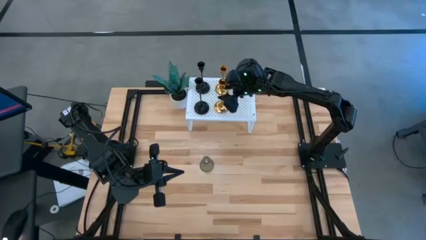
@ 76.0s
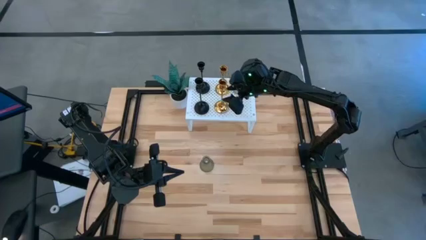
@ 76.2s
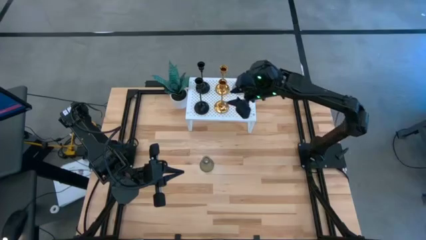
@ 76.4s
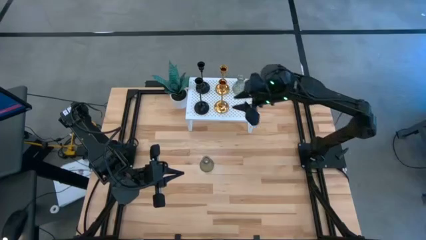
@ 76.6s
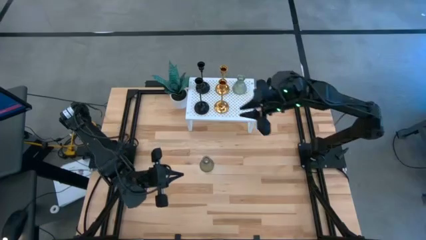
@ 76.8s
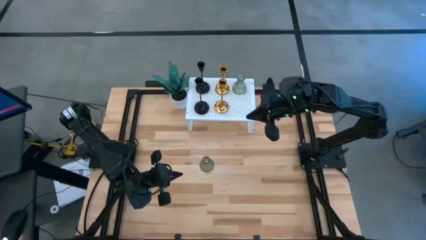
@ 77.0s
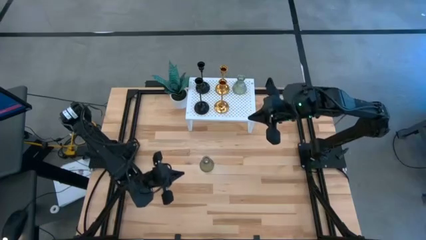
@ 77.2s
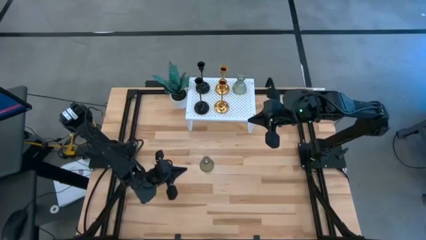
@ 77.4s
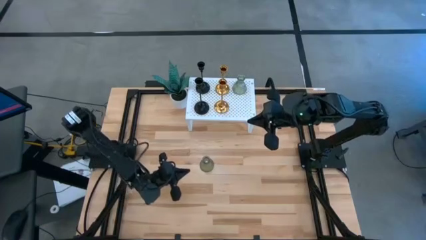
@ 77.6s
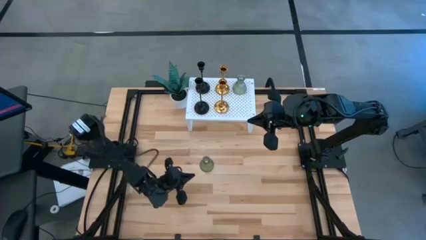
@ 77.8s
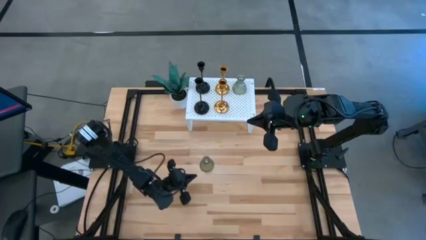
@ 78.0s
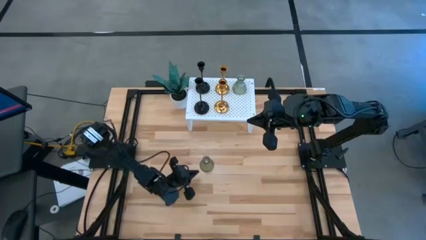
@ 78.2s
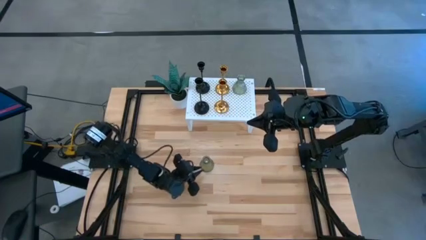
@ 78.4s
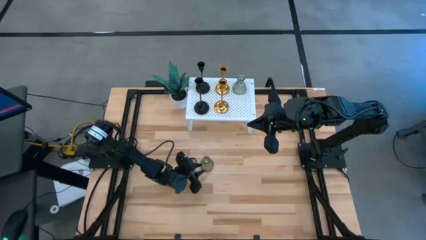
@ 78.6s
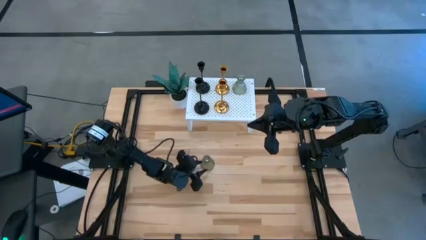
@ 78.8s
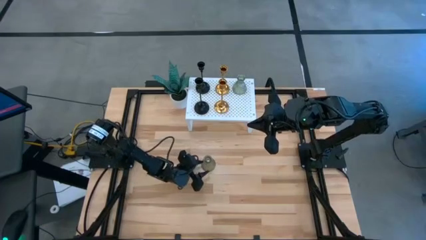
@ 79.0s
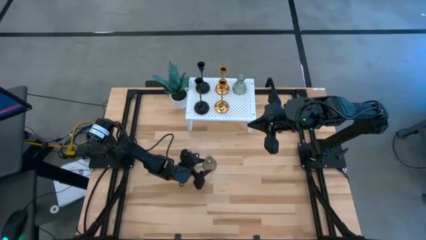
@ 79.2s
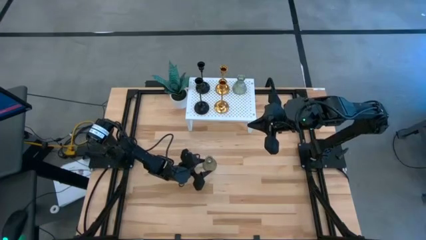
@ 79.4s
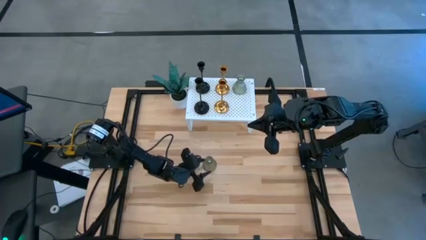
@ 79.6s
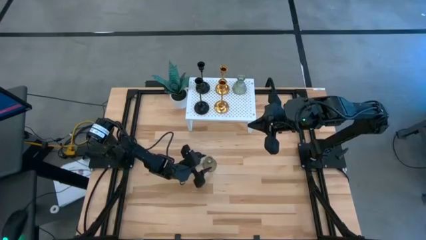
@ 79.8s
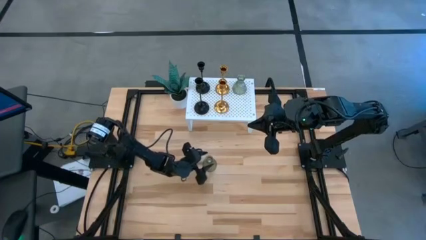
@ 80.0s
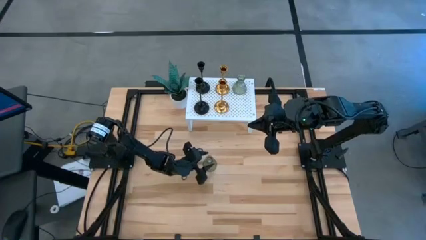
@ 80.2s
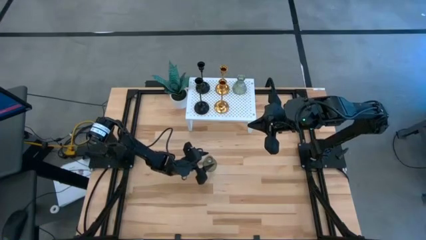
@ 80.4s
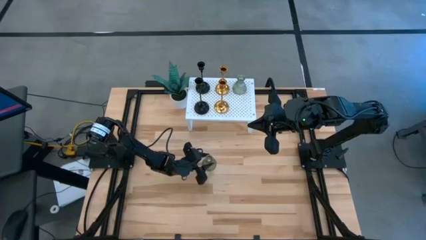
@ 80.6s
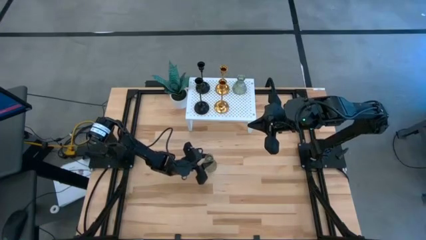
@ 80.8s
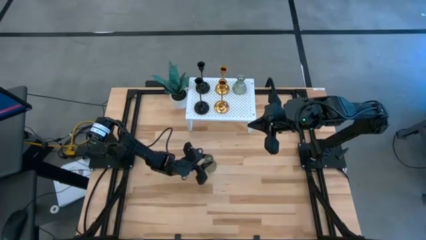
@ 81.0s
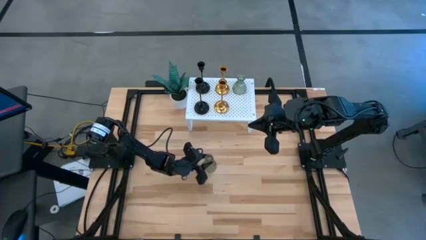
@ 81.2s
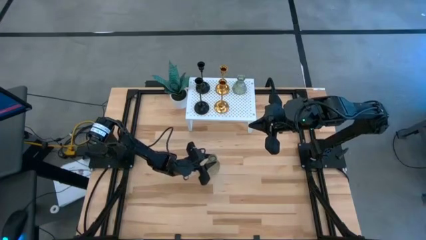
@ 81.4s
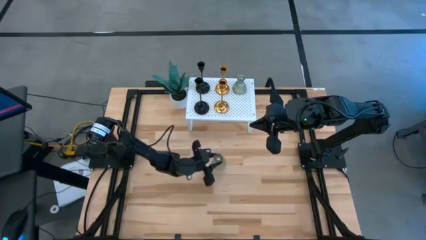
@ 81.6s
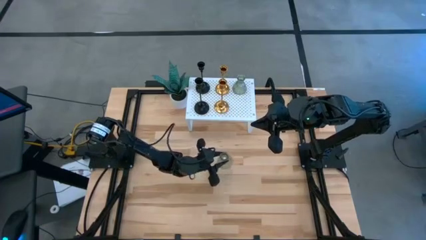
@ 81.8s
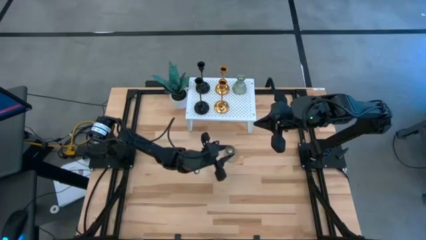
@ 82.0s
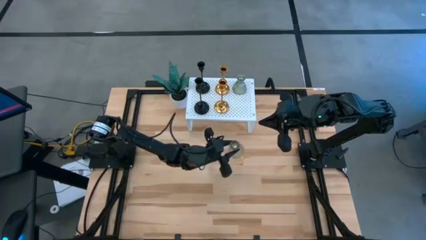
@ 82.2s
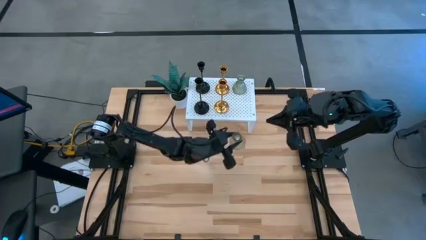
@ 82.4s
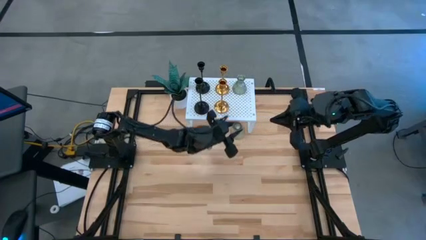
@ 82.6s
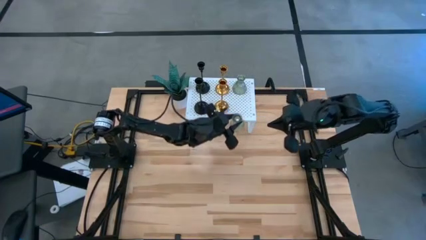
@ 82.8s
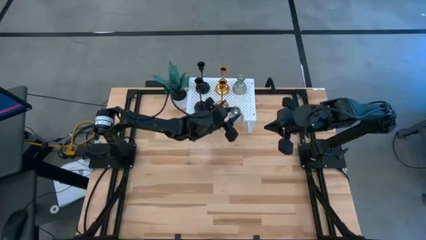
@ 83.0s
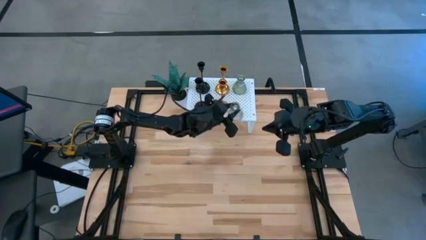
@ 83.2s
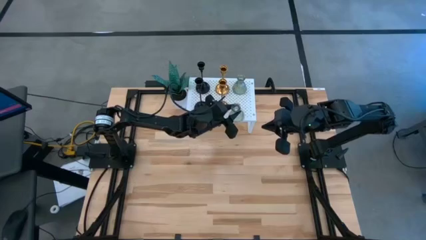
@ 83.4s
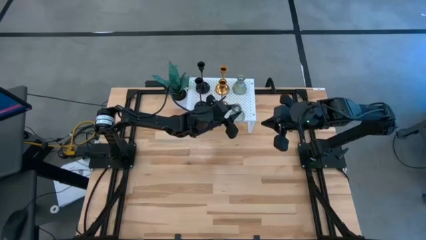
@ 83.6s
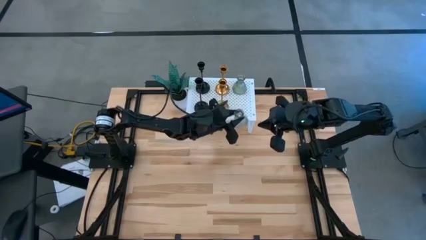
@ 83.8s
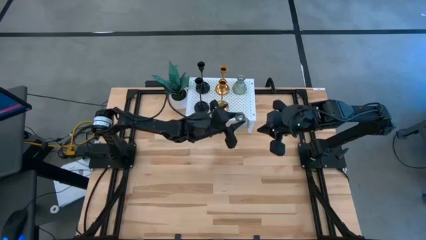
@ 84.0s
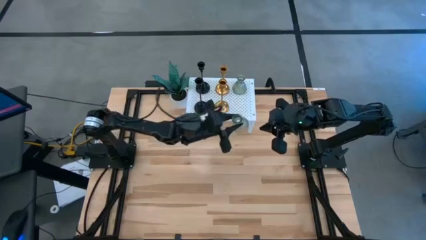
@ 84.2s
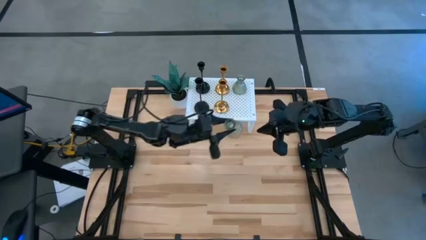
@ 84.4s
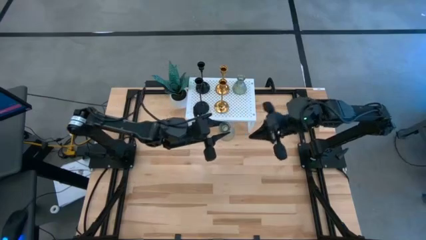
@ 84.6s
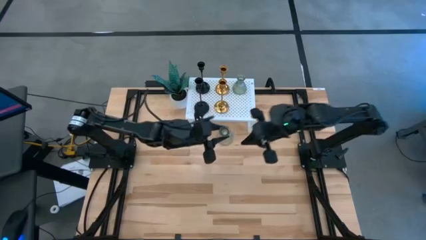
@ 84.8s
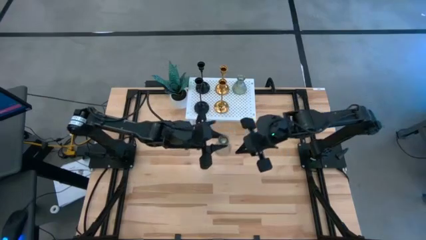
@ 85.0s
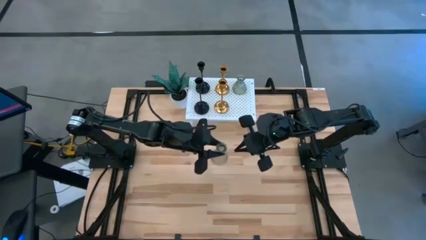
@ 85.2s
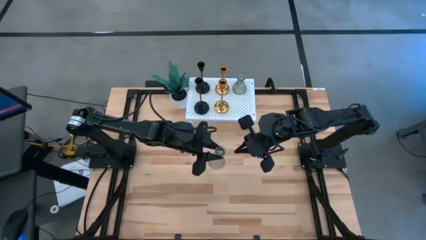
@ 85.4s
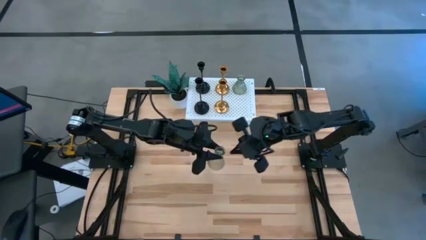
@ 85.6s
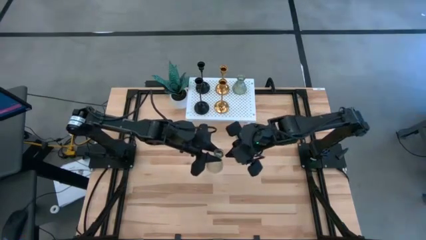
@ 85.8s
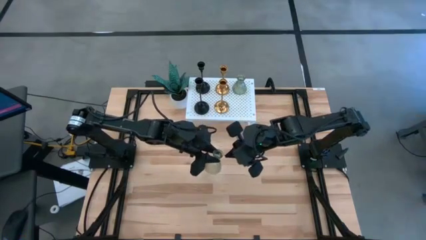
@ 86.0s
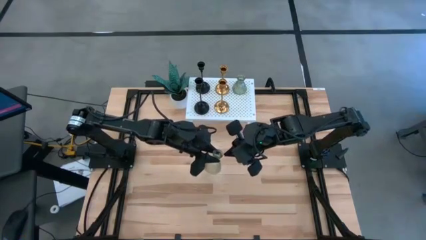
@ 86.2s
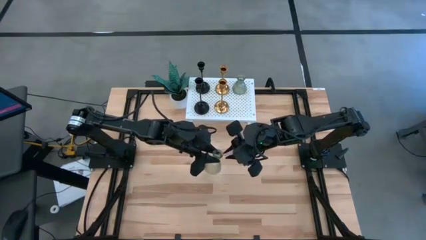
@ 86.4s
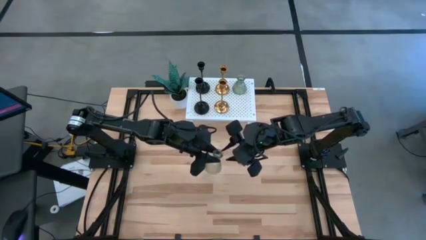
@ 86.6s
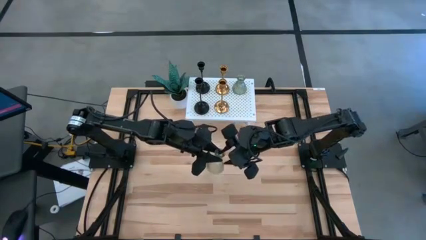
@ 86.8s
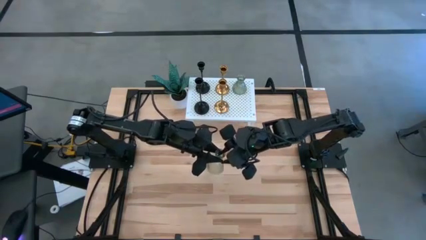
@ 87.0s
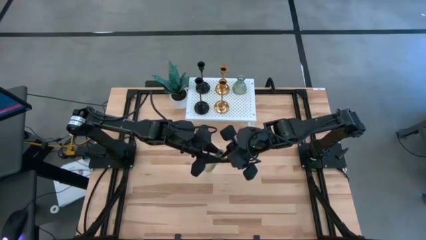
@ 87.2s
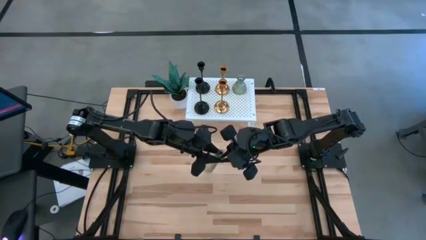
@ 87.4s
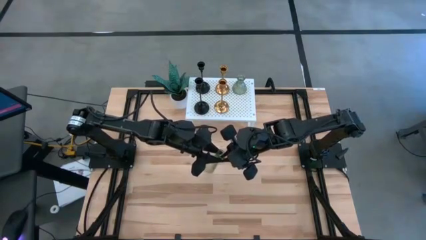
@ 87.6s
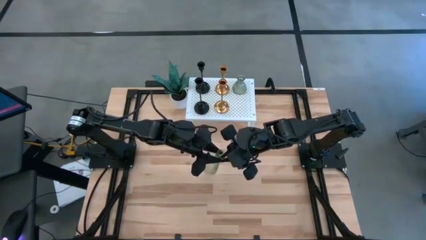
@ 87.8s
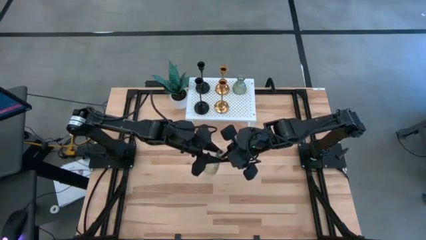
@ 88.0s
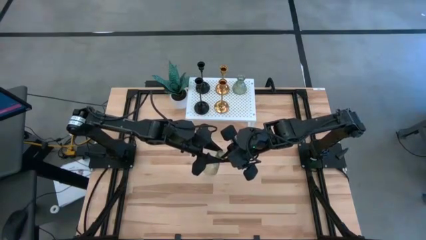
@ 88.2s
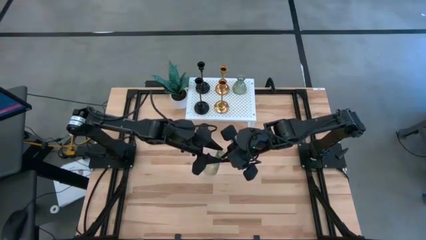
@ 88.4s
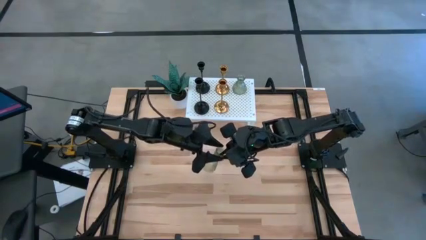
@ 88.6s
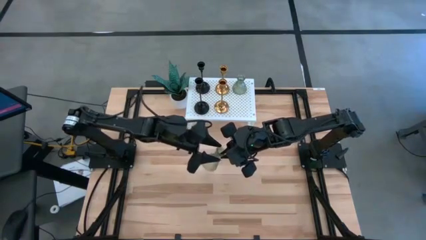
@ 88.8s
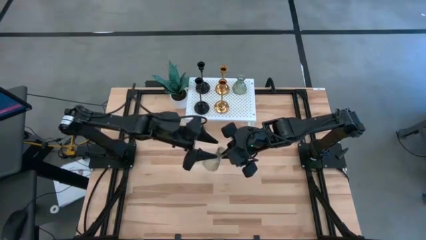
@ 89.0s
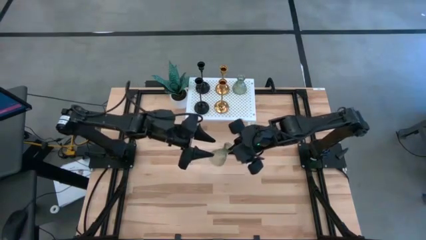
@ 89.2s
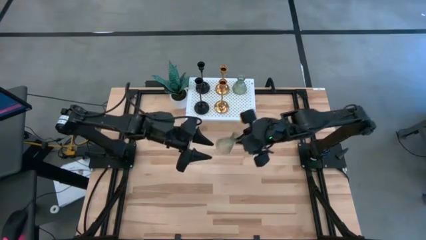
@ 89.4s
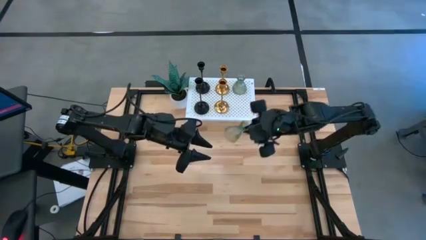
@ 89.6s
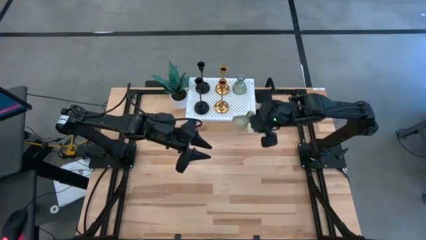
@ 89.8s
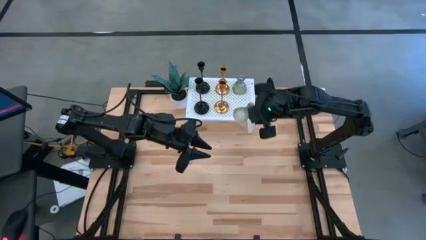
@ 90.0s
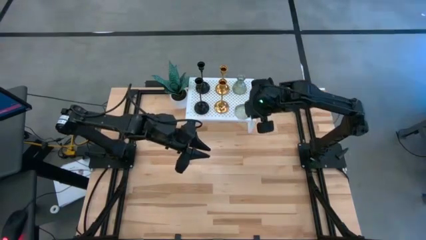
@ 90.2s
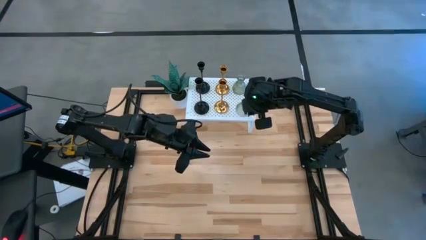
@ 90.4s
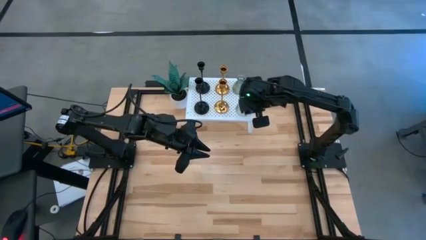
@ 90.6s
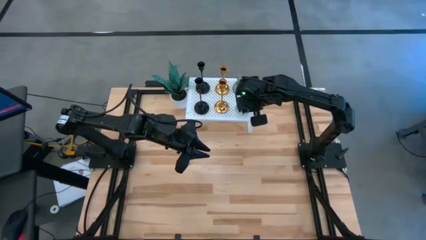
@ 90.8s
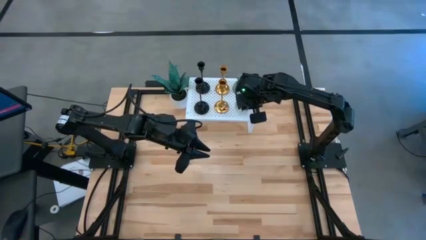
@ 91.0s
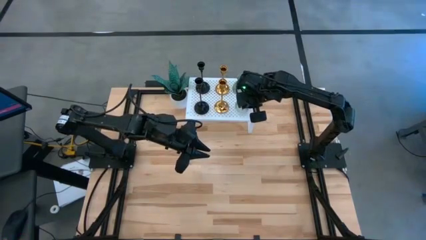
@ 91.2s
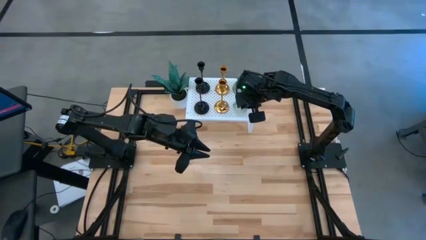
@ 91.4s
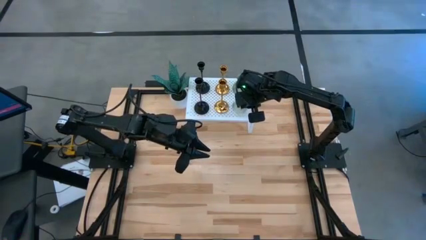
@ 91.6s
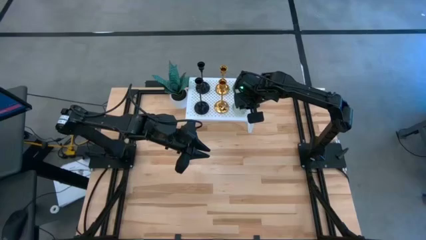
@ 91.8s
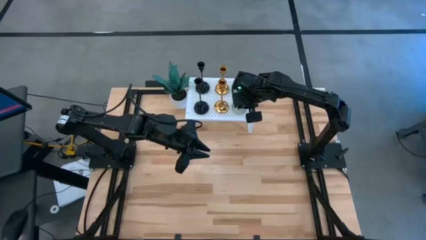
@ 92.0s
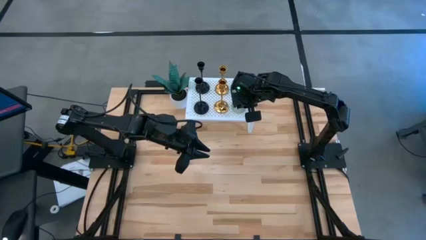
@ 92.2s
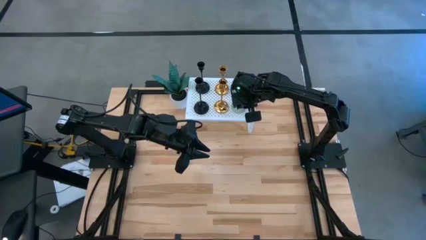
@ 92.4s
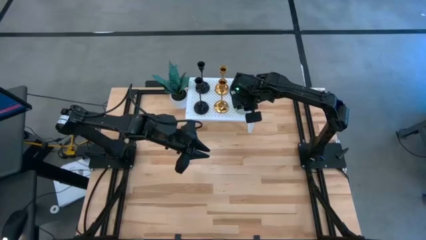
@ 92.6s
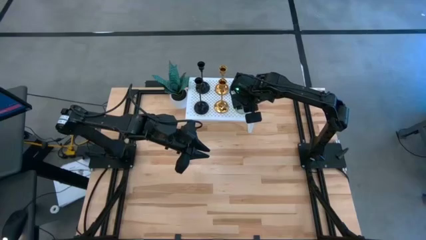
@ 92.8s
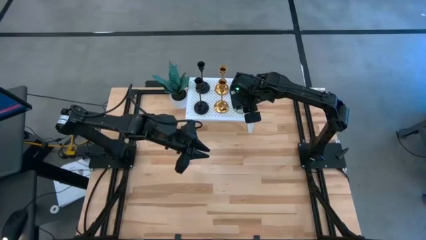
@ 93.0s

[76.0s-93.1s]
Task: Pick & Place candle stick holders
Align the green glass candle holder on the shelf with the other green glass candle holder

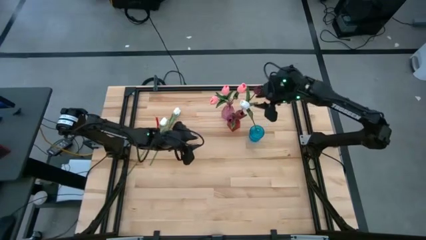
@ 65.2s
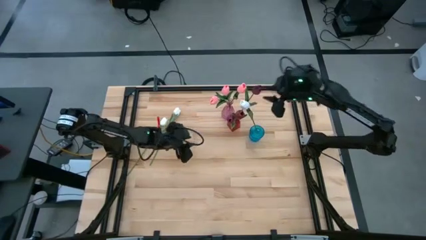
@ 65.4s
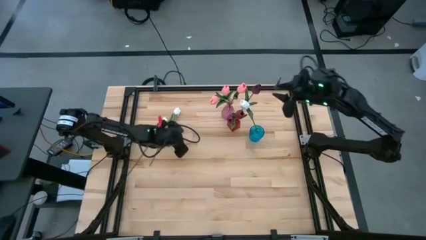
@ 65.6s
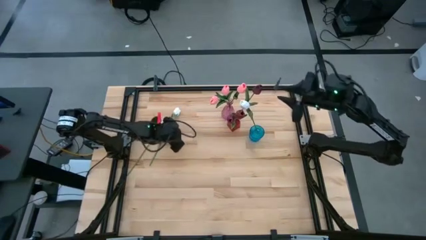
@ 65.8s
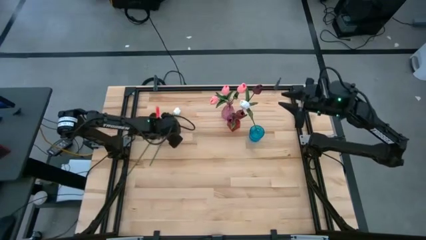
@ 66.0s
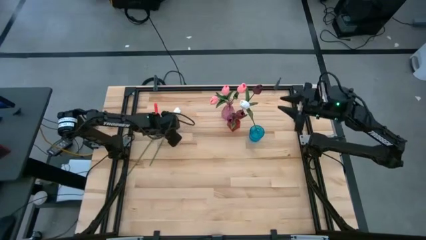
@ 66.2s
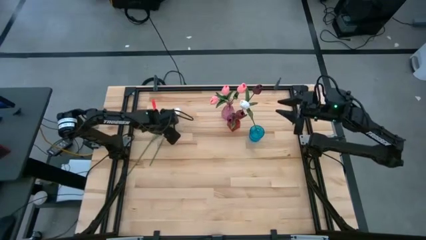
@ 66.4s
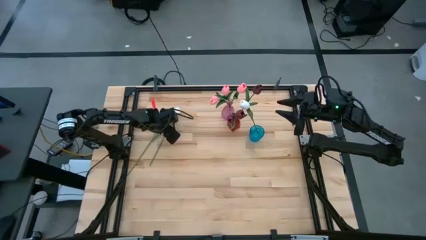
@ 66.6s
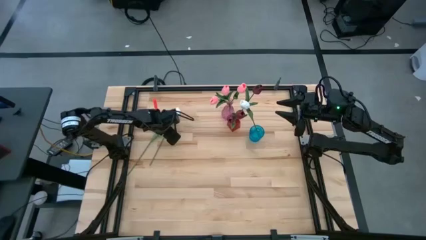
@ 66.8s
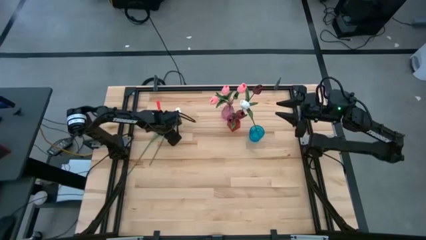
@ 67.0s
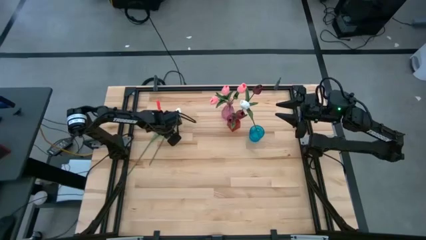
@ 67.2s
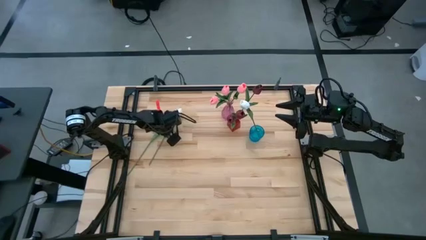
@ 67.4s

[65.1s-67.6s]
Task: Sort flowers into vase by color
Put the white flower into the blue vase
